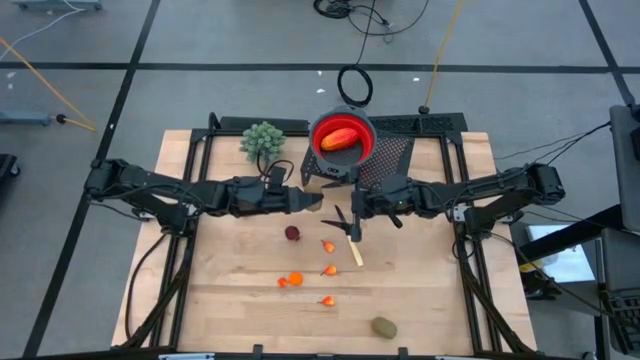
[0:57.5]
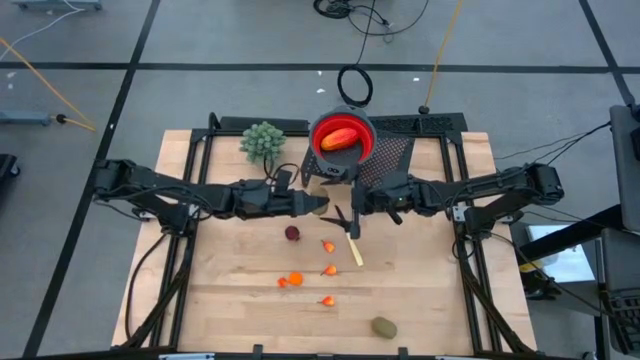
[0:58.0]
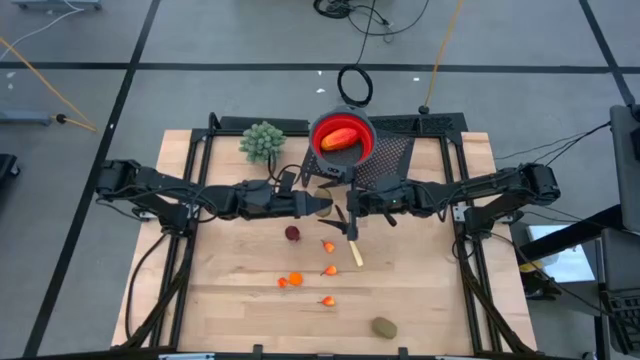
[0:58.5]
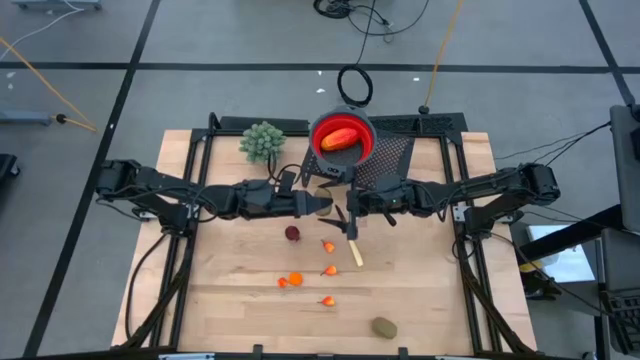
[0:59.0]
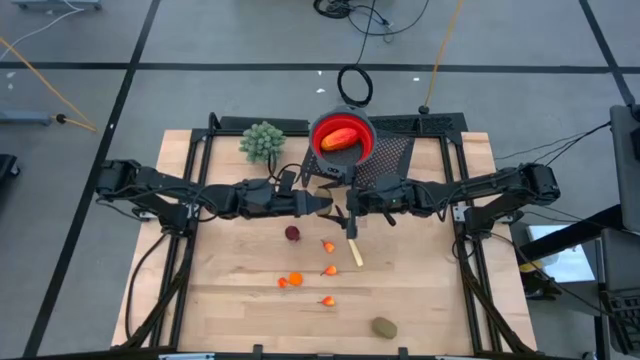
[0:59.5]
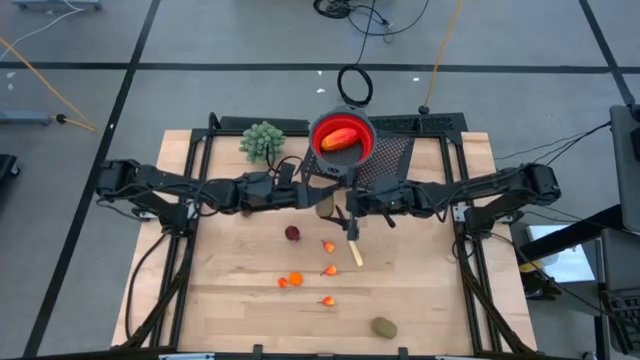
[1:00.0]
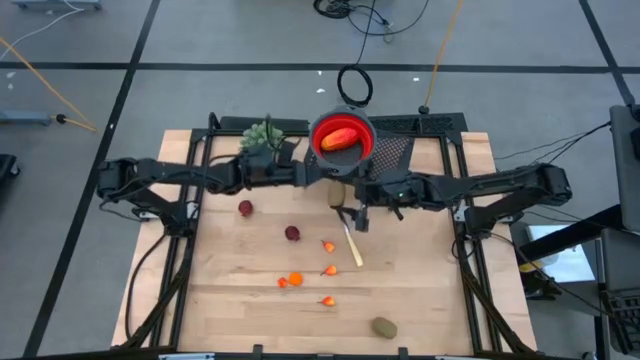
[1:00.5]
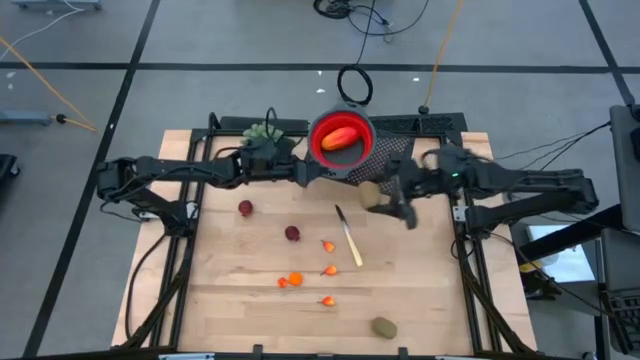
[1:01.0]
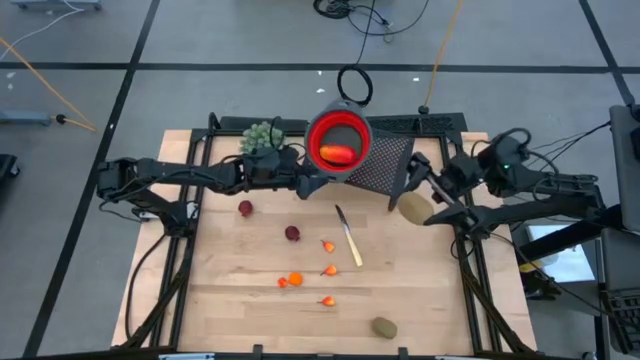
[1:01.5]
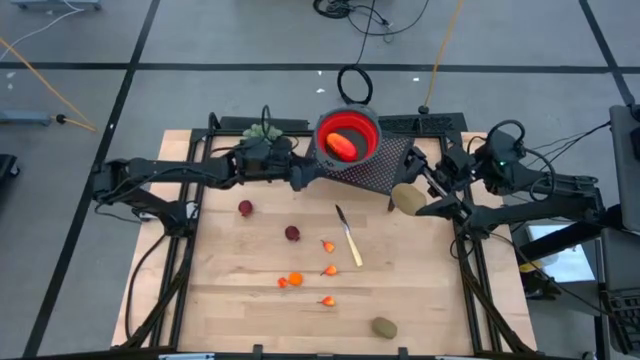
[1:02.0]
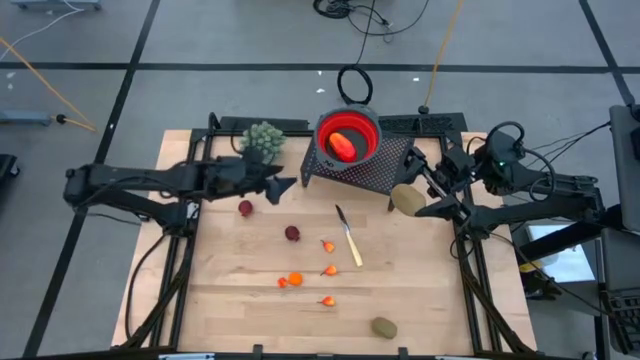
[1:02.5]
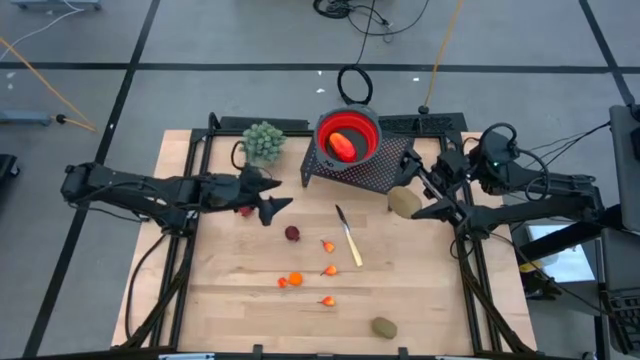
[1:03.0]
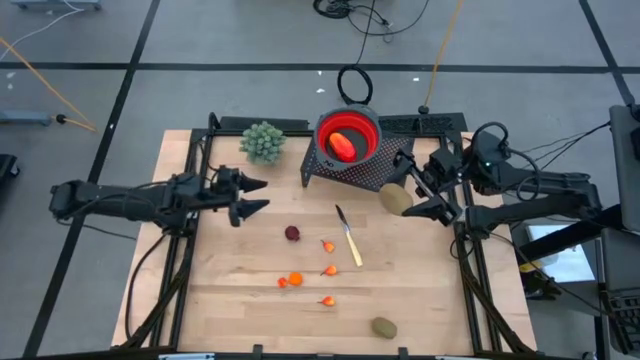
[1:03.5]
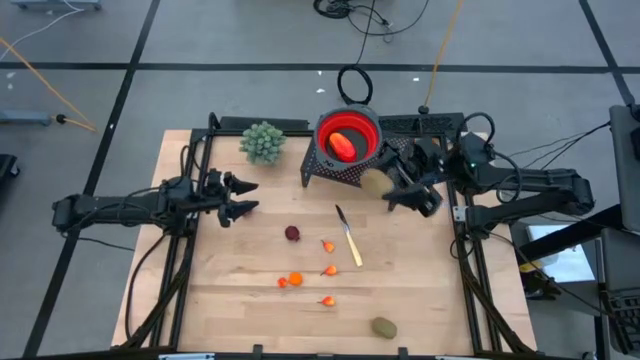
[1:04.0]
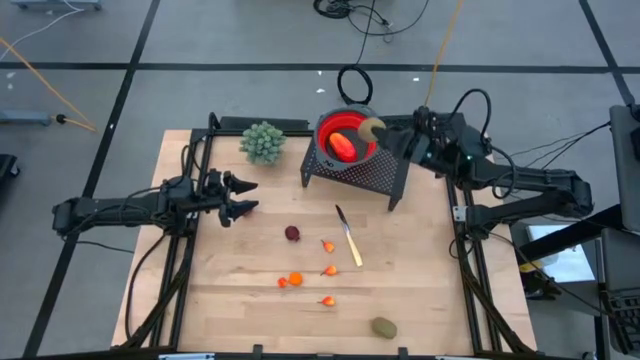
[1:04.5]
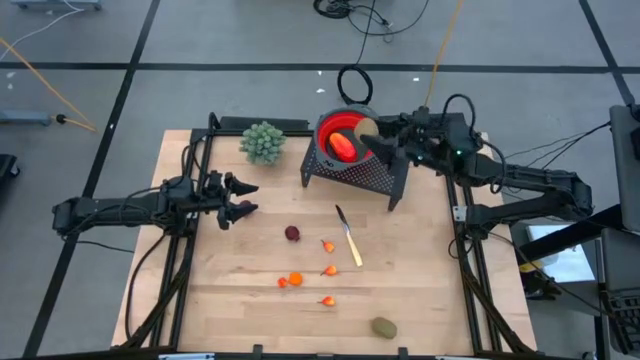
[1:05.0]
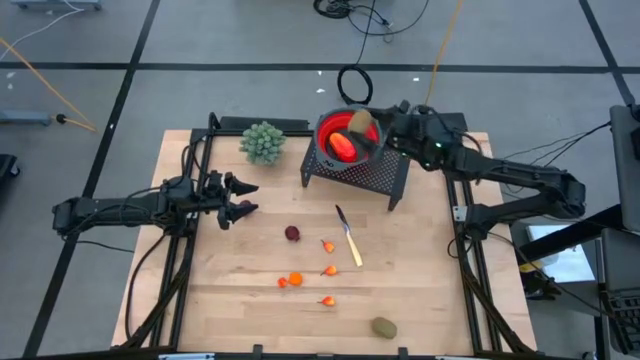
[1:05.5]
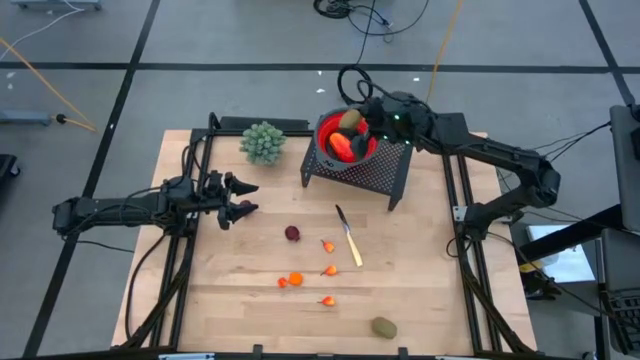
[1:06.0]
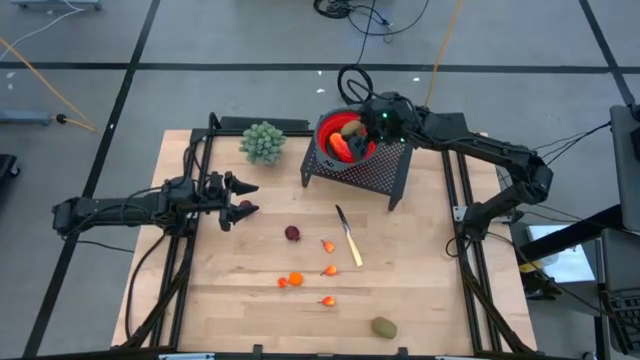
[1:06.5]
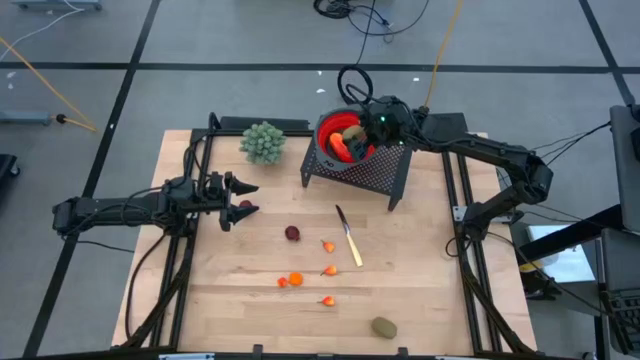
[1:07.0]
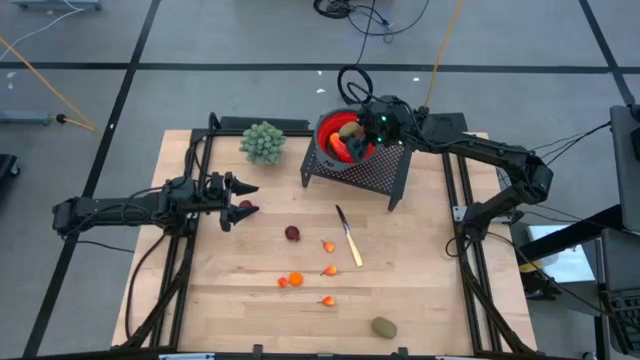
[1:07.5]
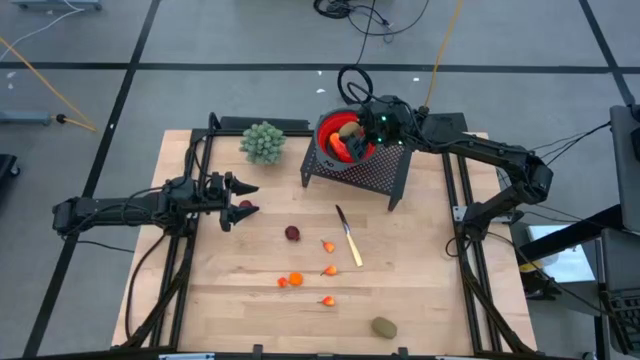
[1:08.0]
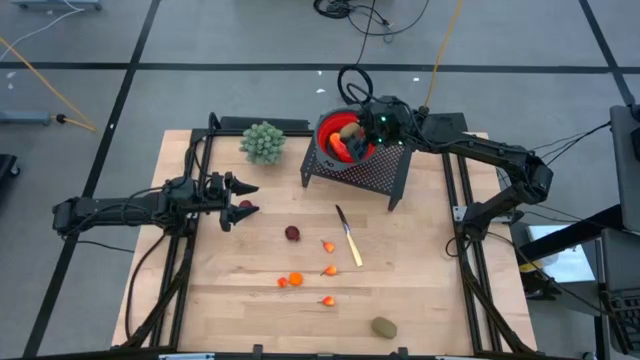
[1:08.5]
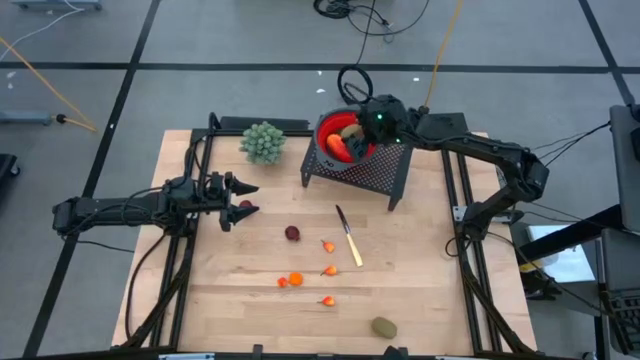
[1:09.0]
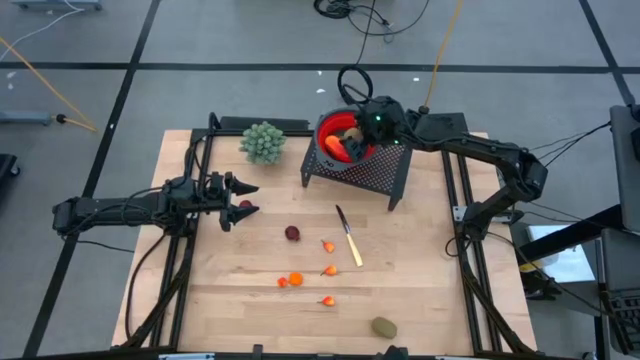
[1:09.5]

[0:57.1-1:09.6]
Task: Pick & Place Fruit
Put the green kiwi into the red strainer bowl on the shelf

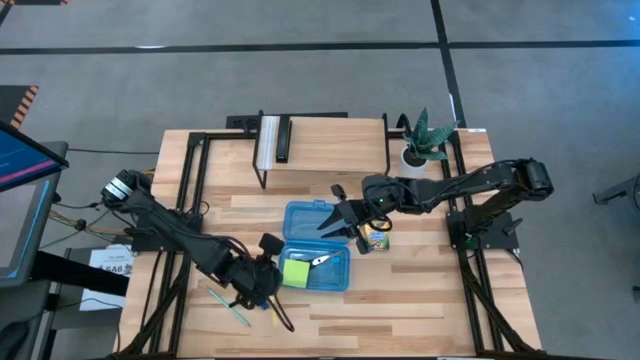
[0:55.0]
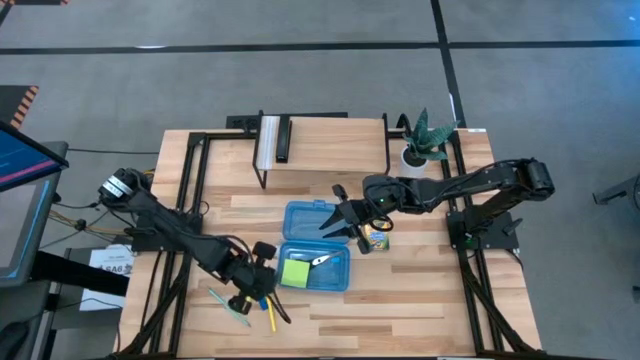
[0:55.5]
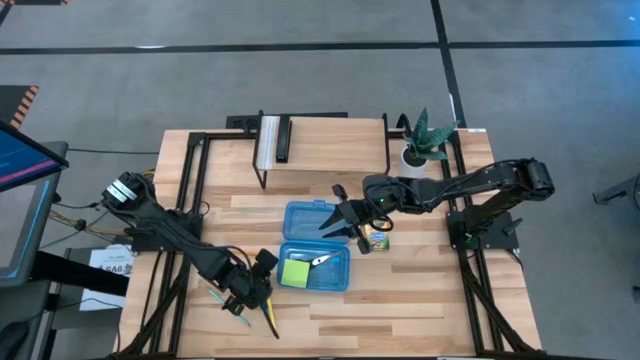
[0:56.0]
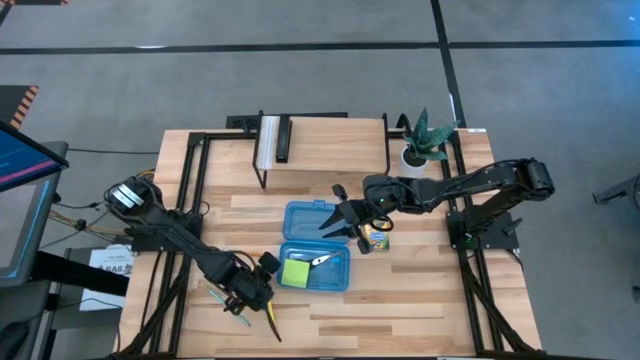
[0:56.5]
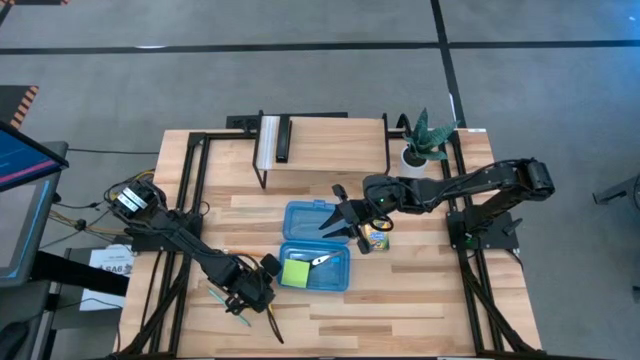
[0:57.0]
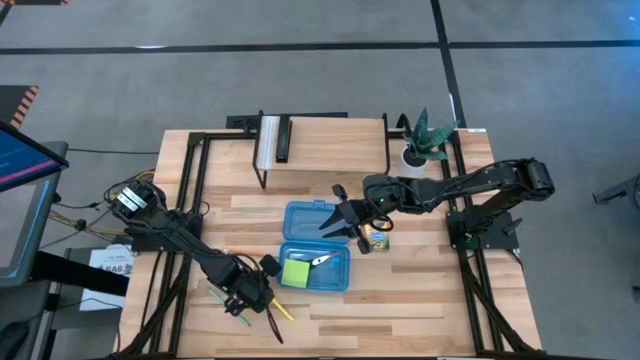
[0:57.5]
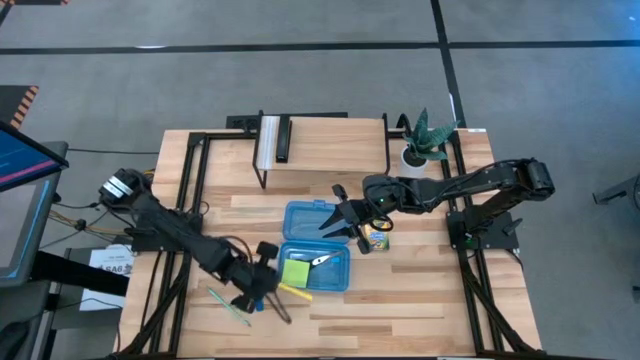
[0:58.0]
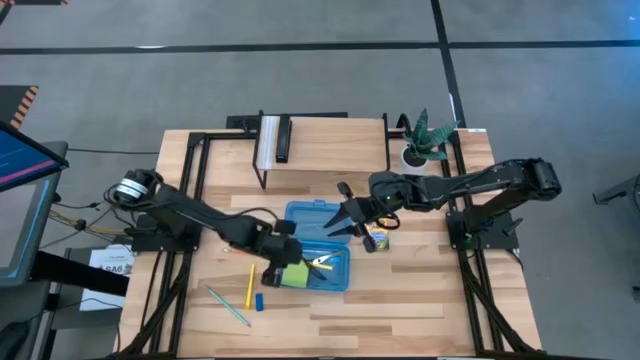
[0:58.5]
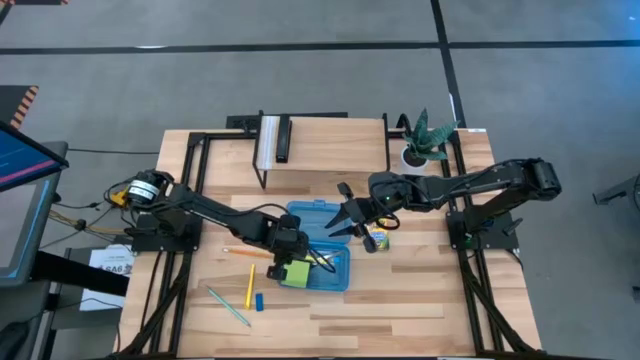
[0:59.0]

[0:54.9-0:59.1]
Task: Pack school essentials
Put the right yellow pen into the blue supply box

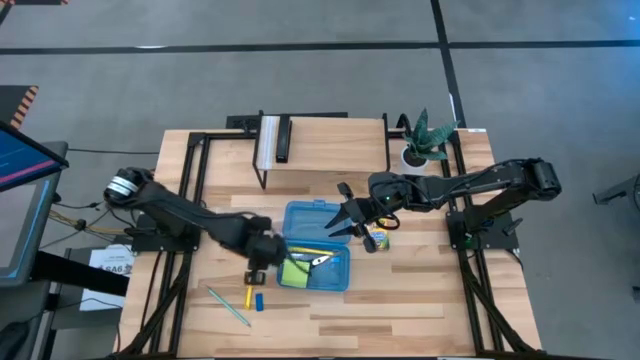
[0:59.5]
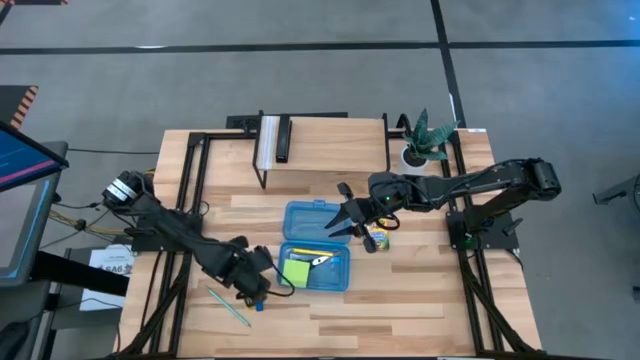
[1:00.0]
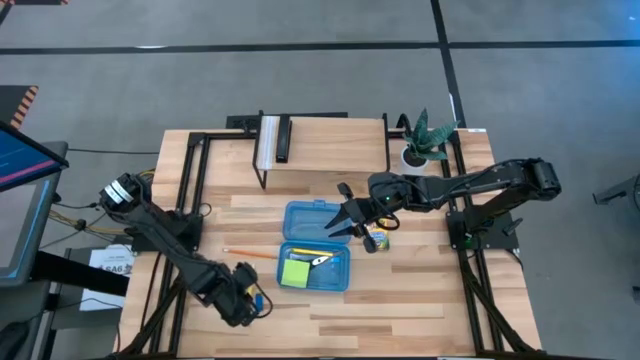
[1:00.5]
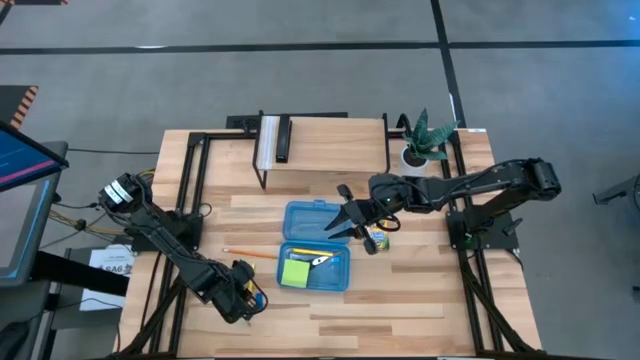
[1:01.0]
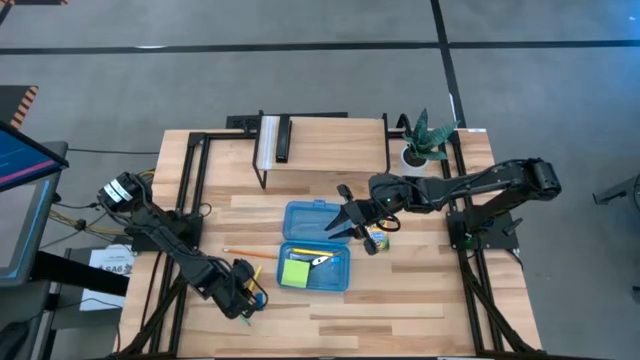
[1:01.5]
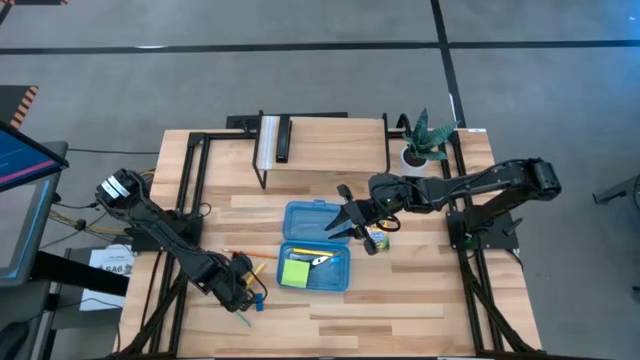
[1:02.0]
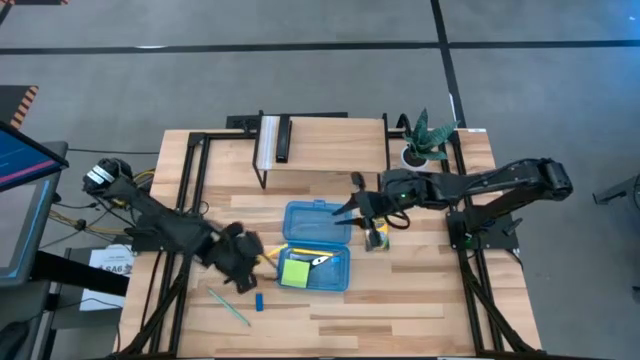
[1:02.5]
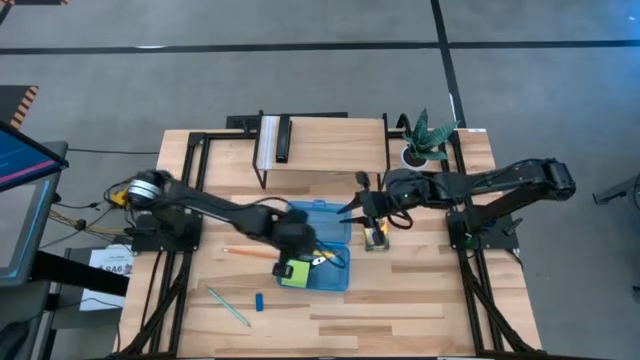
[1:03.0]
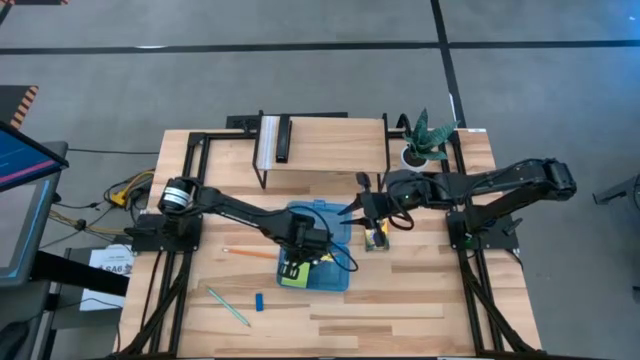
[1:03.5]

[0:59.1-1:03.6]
Put the yellow pen into the blue supply box
